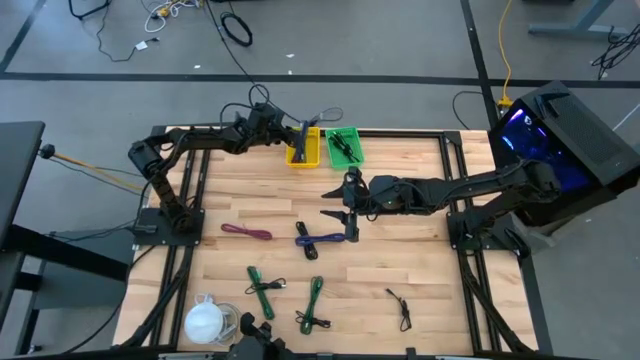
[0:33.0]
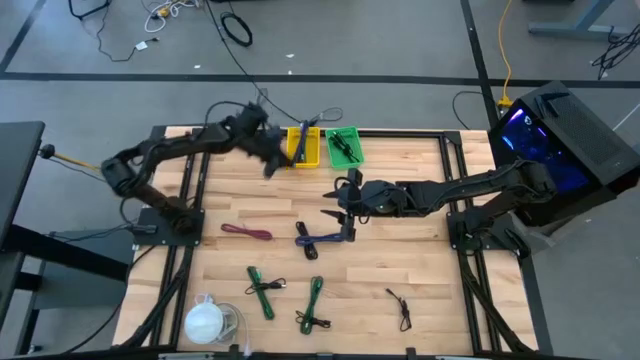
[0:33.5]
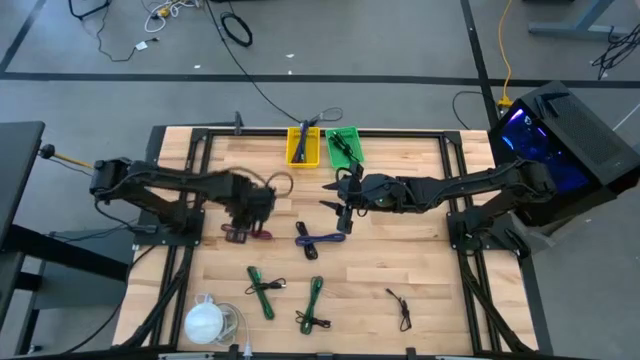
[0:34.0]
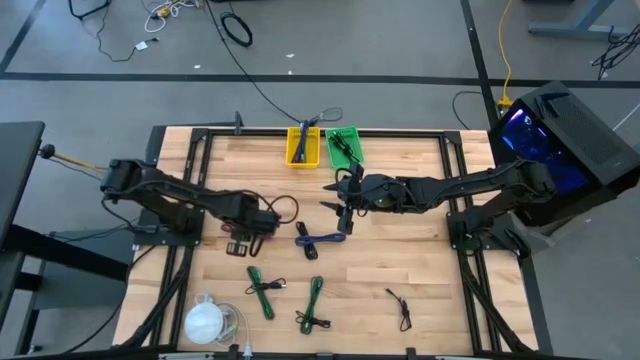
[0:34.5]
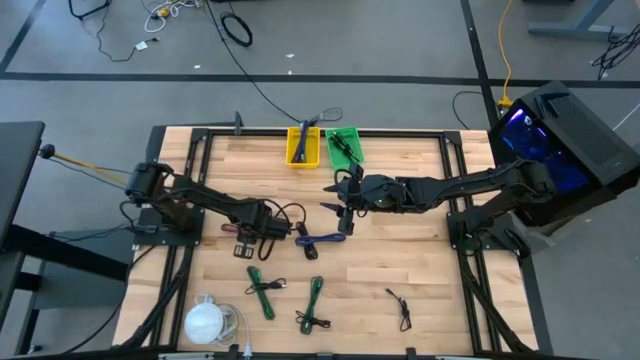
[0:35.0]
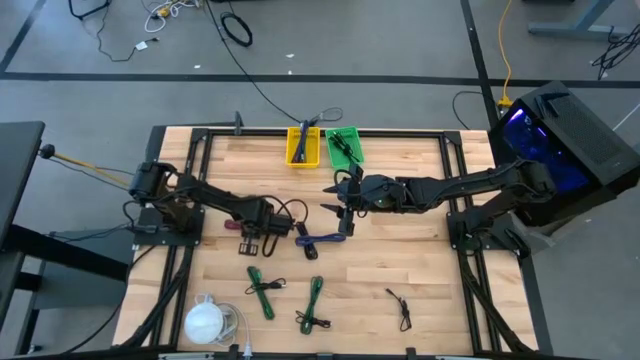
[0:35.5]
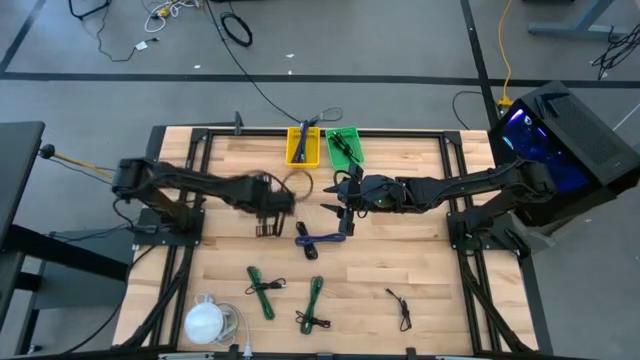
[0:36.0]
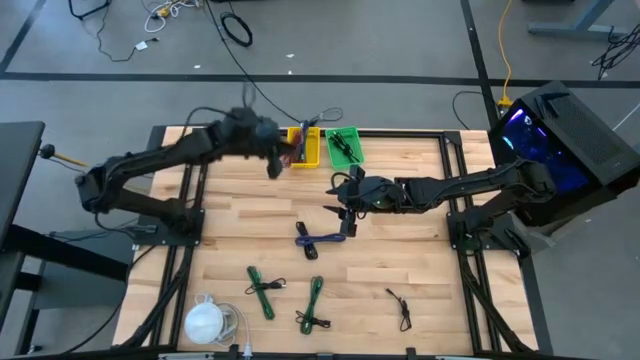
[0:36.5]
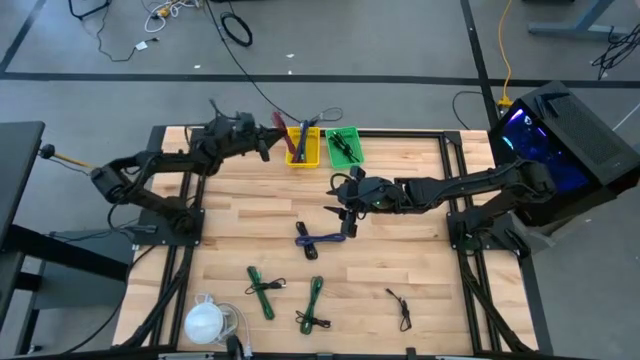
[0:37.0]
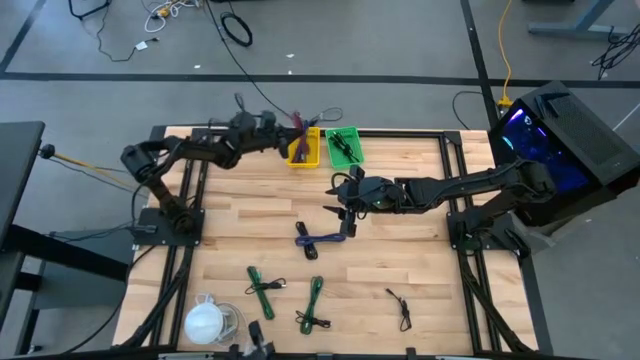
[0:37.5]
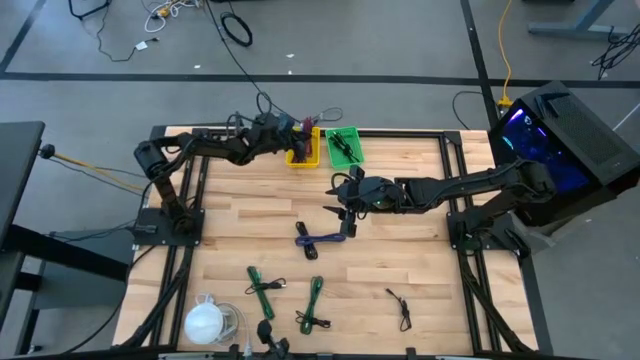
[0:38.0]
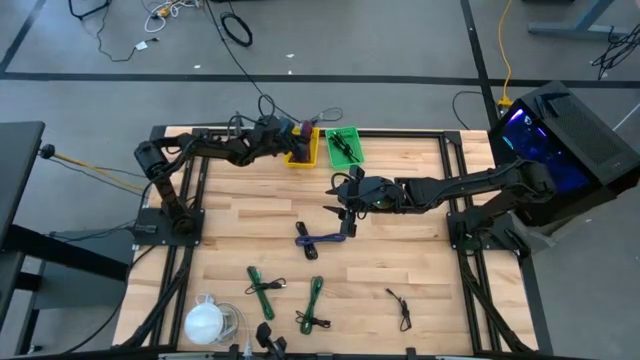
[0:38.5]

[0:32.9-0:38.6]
Task: Pick & Place USB Port
Put the pink charger cable into the yellow bin

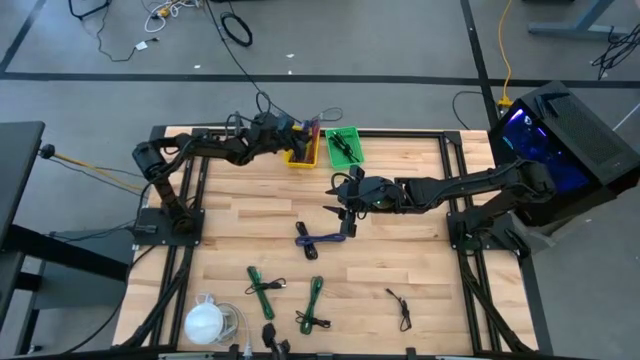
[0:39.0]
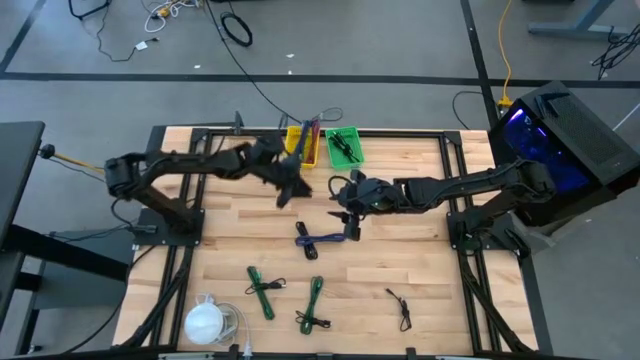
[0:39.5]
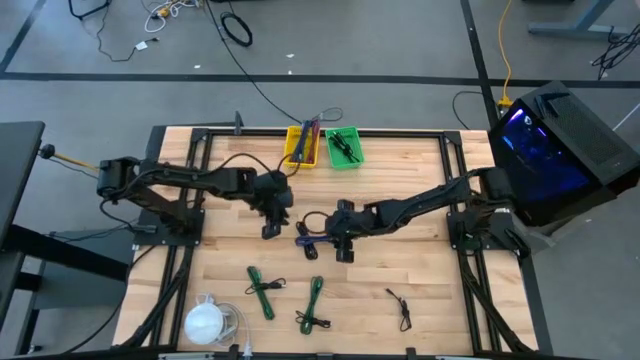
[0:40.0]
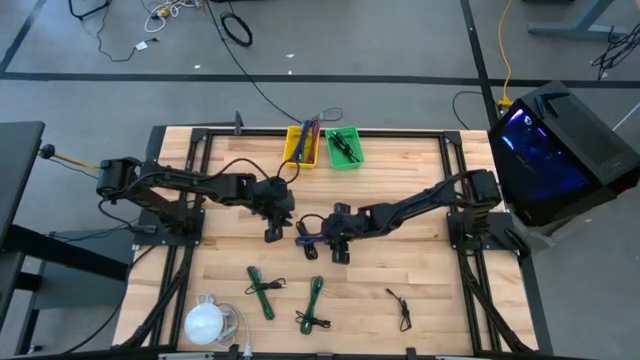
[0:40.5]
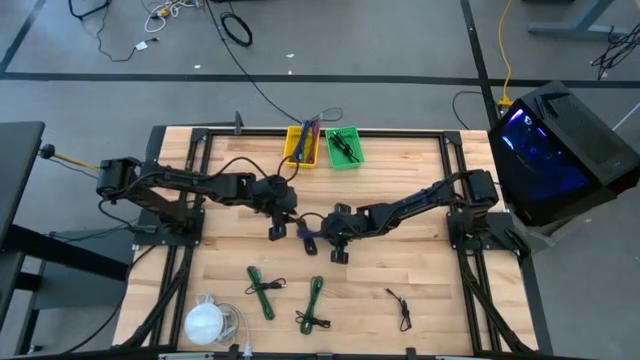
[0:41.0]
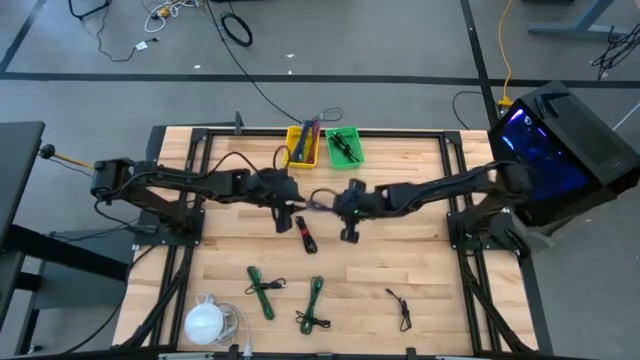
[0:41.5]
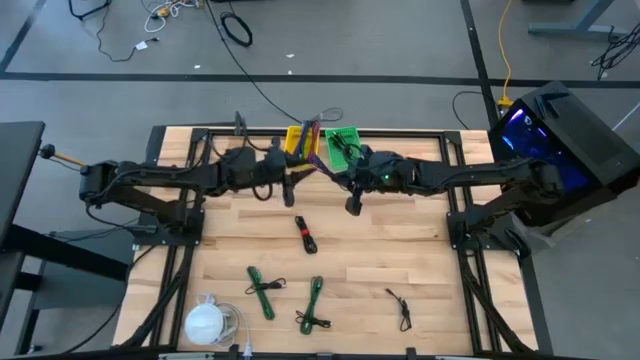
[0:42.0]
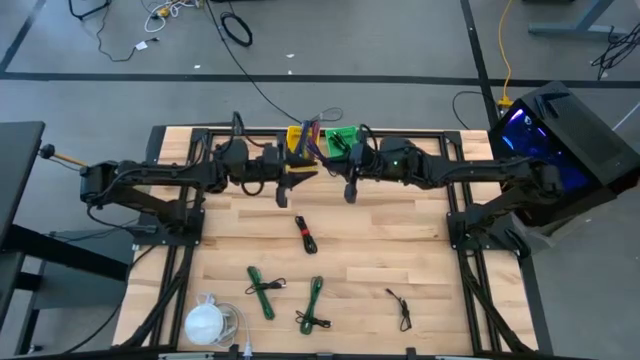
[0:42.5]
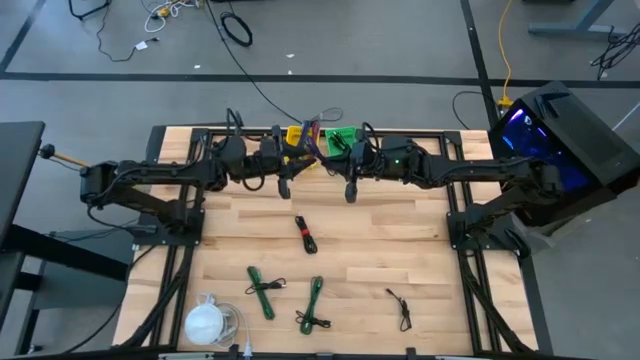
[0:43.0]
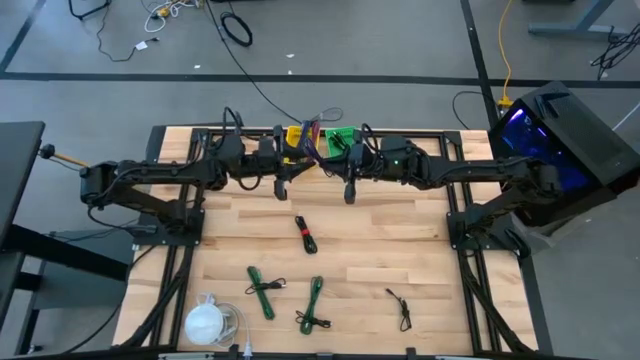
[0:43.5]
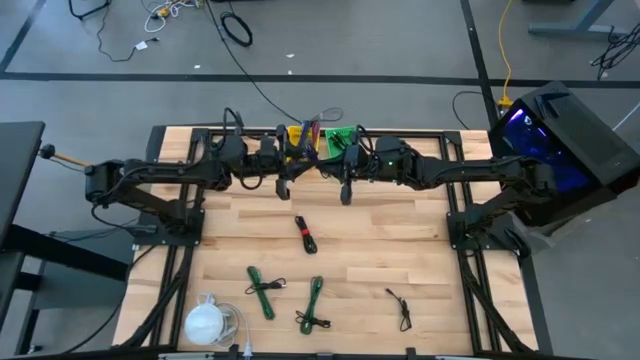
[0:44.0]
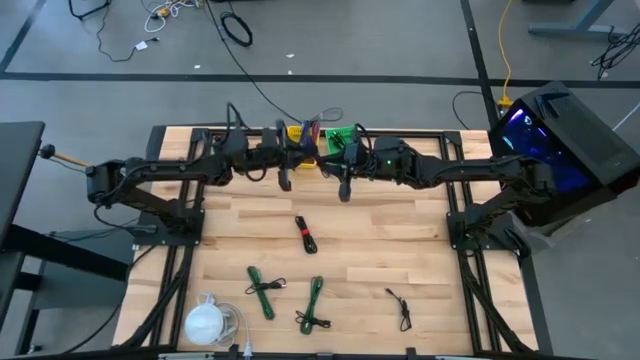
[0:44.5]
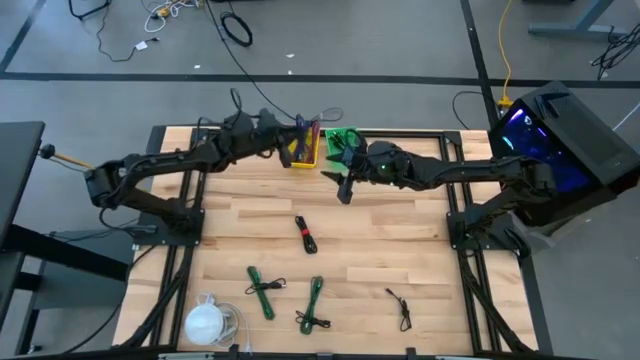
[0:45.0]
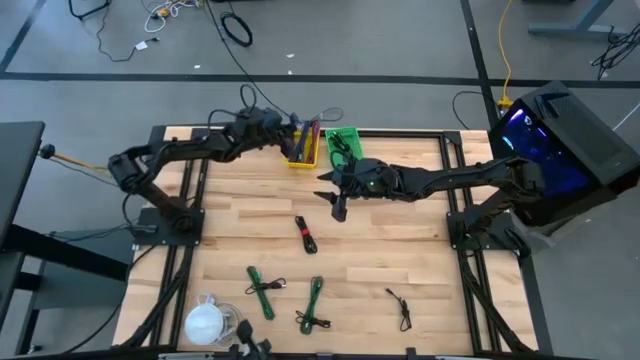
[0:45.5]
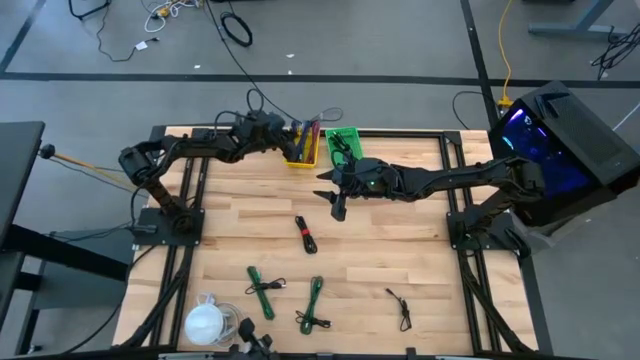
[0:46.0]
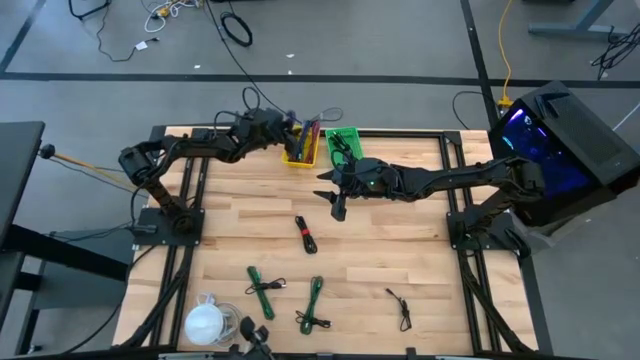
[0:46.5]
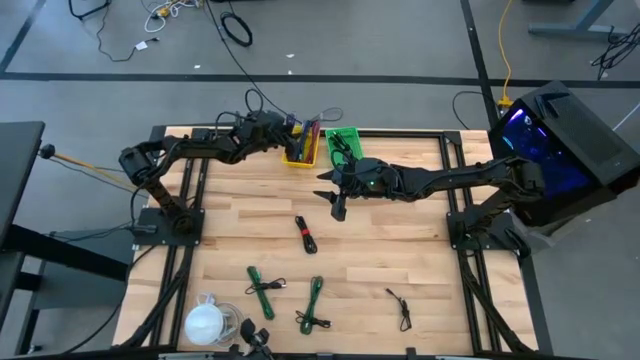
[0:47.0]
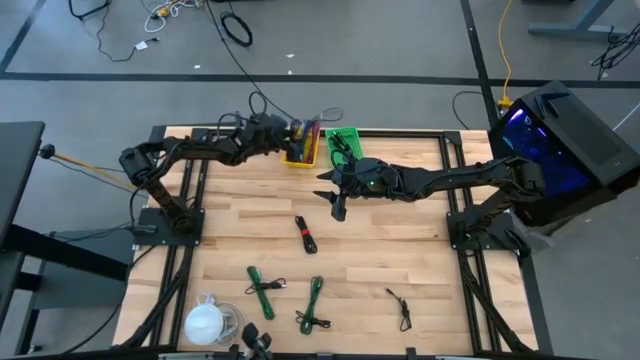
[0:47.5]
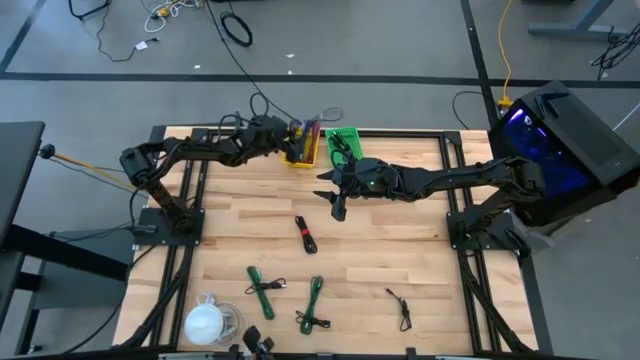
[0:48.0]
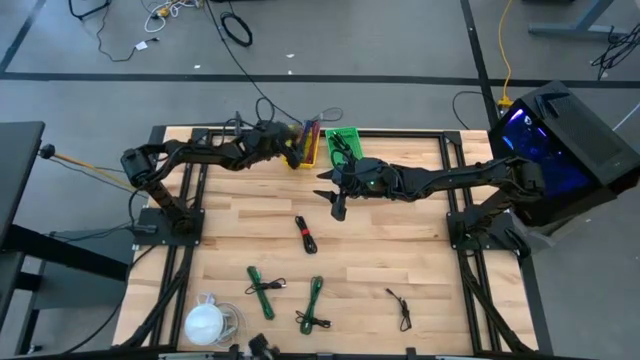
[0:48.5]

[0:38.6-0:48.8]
Put the purple charger cable into the yellow bin

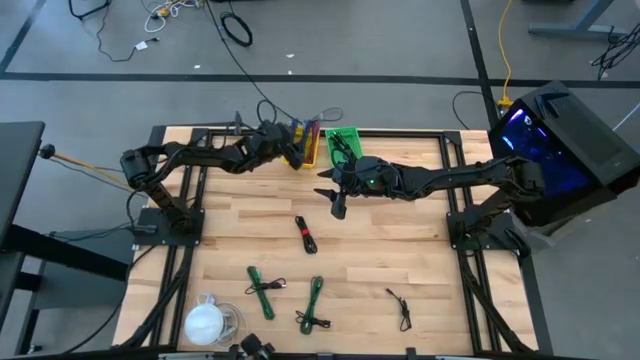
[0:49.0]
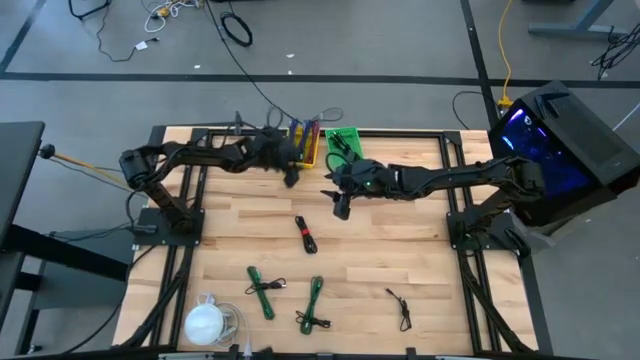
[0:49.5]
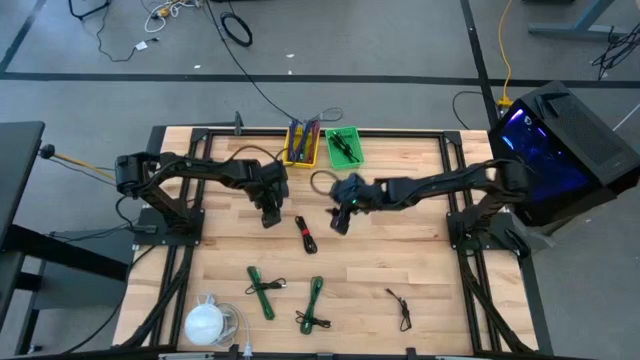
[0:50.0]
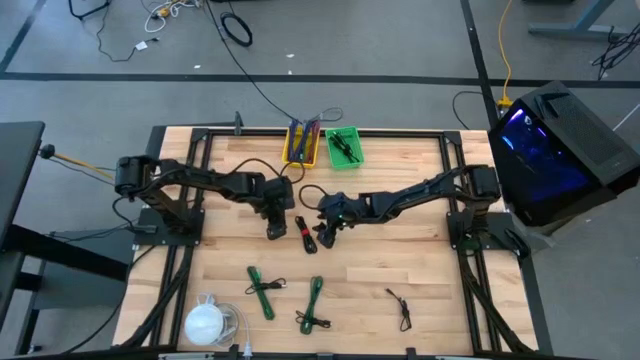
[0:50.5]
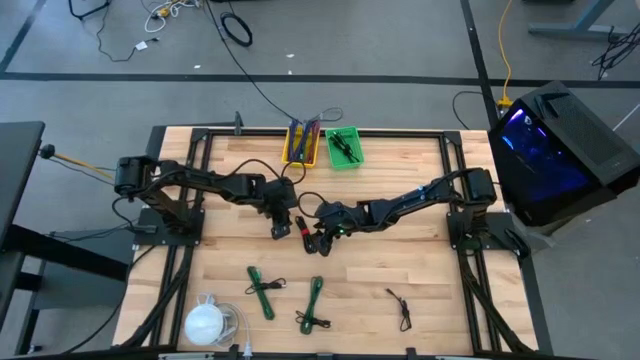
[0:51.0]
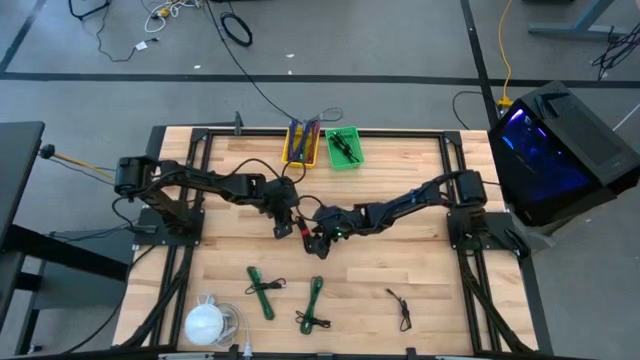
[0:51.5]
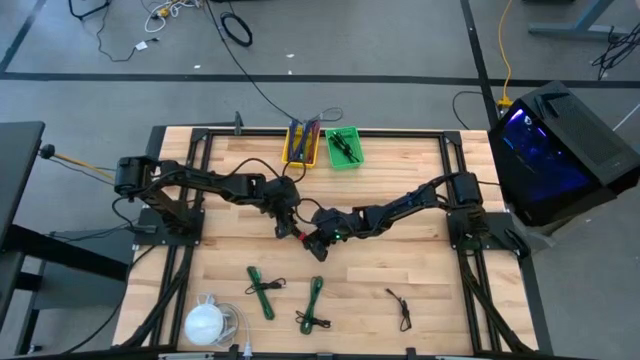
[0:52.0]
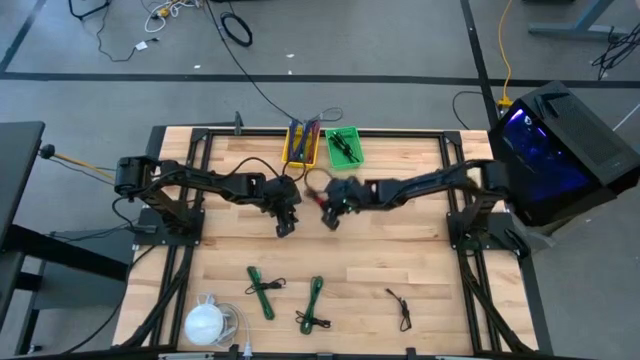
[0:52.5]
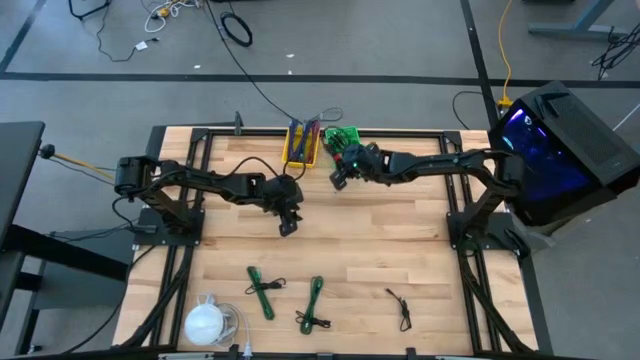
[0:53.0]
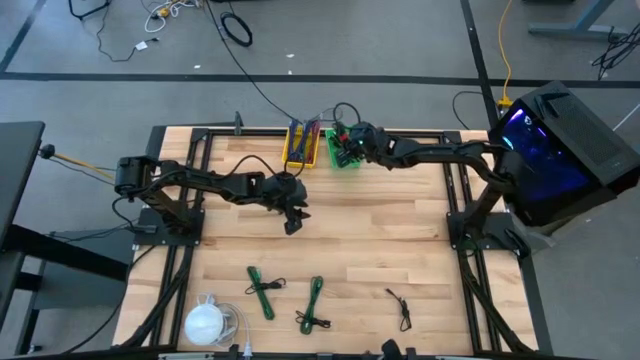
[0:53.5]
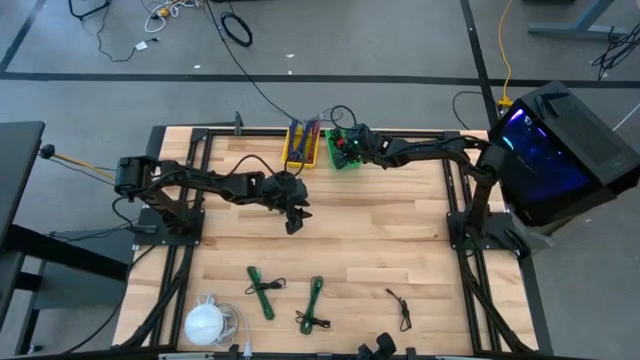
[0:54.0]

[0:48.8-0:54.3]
Put the black usb cable into the green bin
